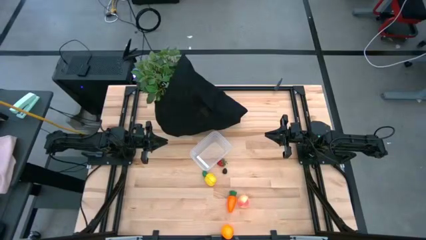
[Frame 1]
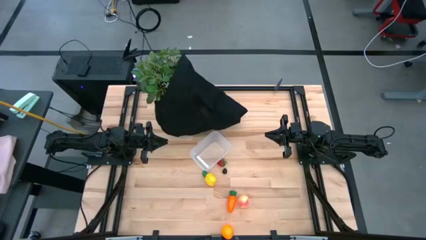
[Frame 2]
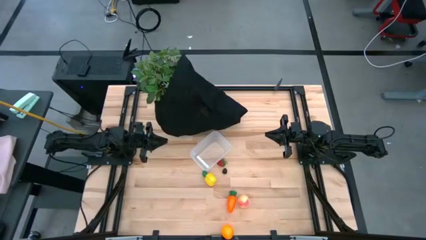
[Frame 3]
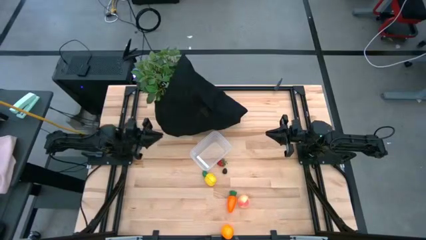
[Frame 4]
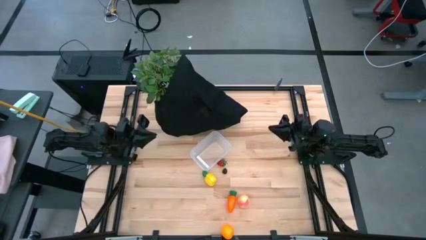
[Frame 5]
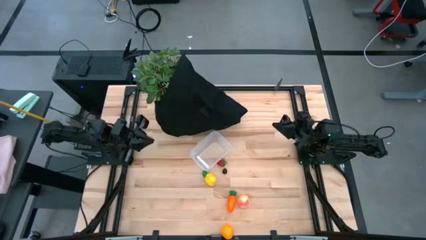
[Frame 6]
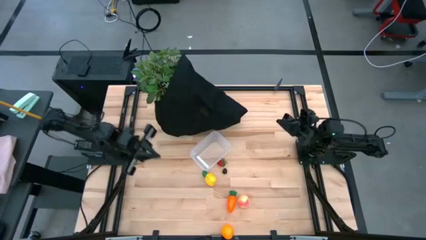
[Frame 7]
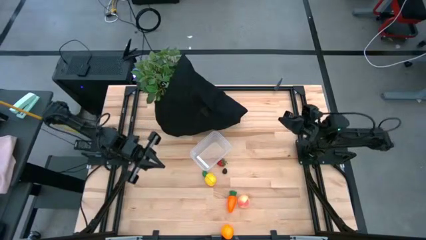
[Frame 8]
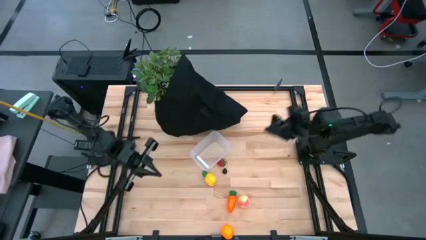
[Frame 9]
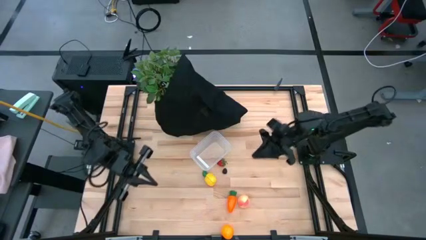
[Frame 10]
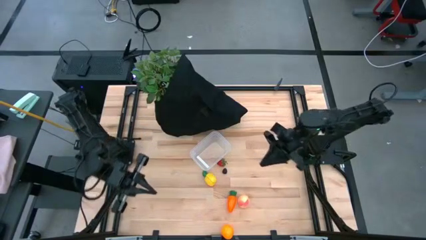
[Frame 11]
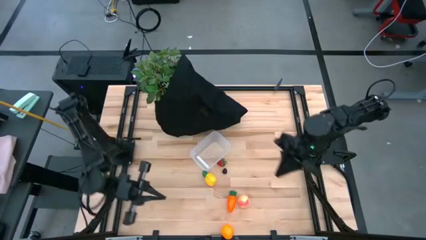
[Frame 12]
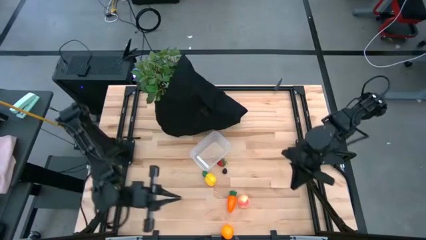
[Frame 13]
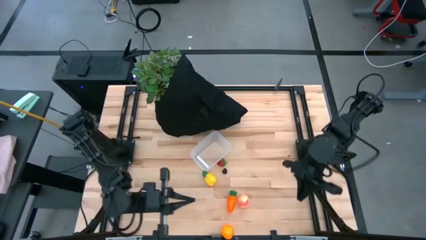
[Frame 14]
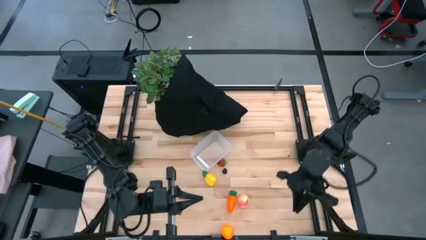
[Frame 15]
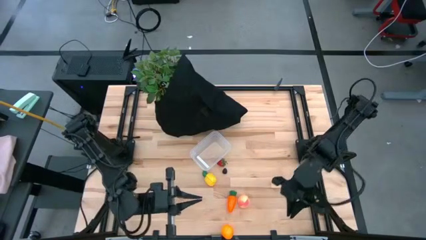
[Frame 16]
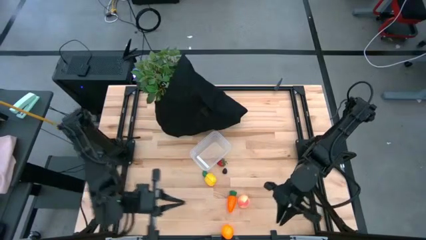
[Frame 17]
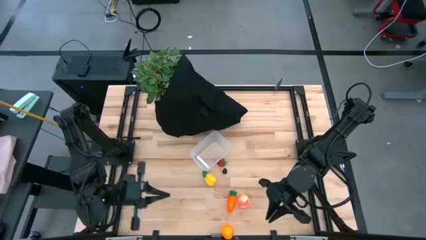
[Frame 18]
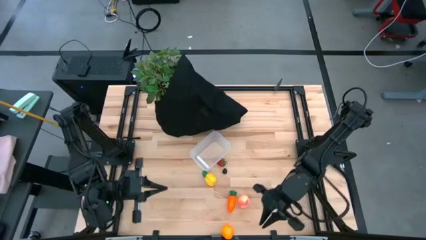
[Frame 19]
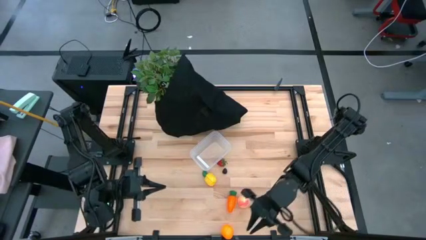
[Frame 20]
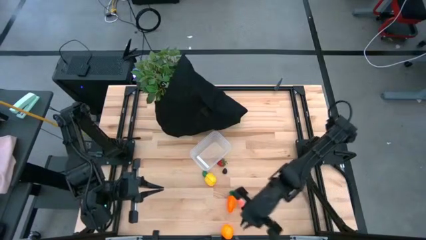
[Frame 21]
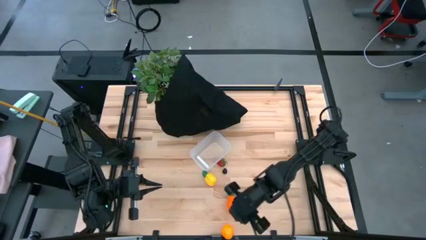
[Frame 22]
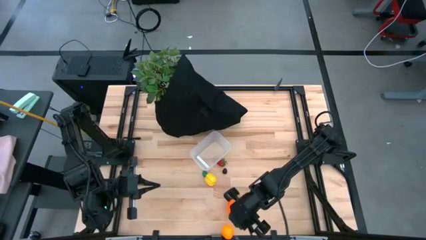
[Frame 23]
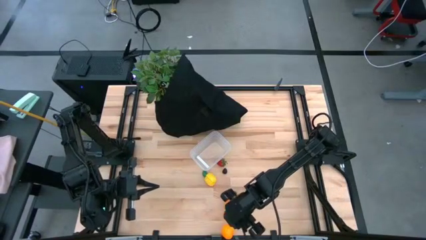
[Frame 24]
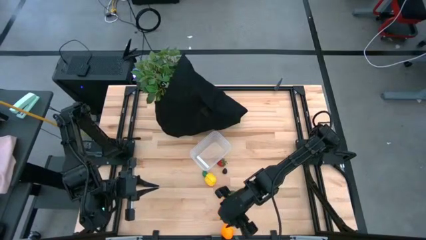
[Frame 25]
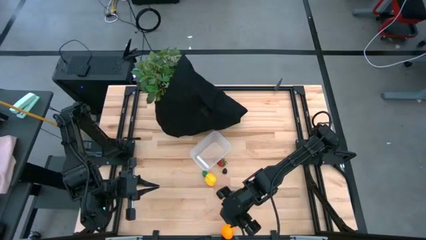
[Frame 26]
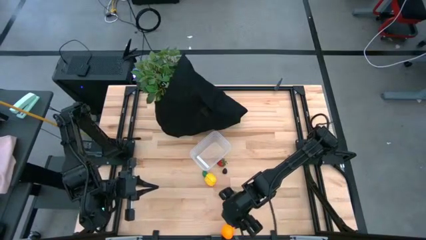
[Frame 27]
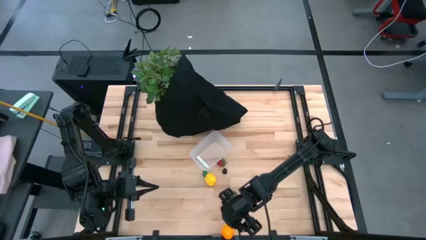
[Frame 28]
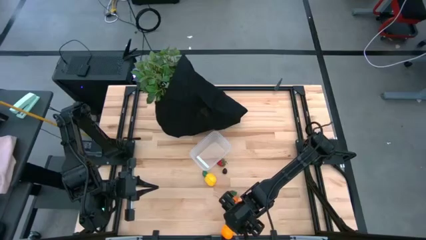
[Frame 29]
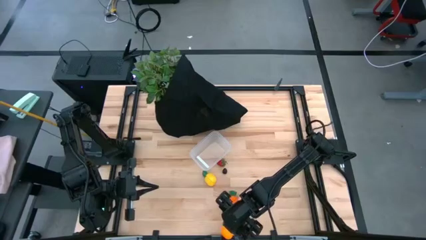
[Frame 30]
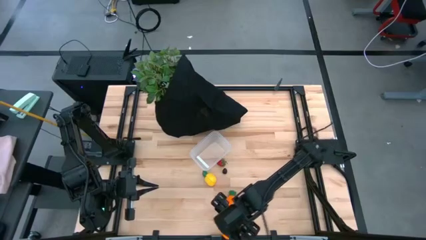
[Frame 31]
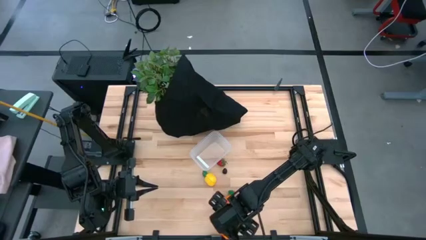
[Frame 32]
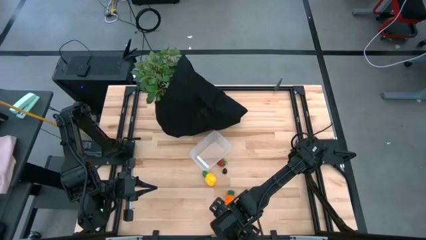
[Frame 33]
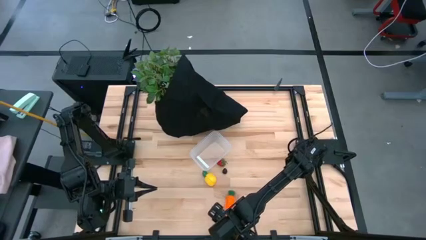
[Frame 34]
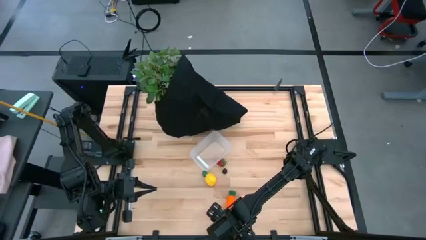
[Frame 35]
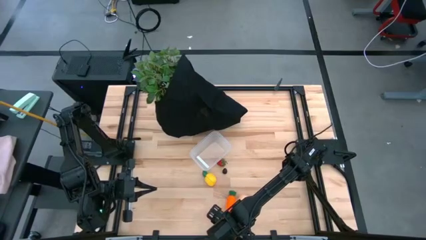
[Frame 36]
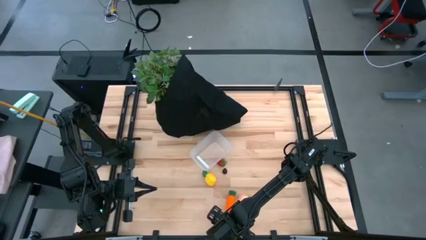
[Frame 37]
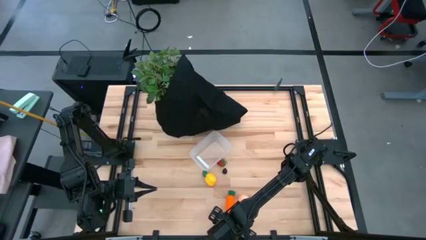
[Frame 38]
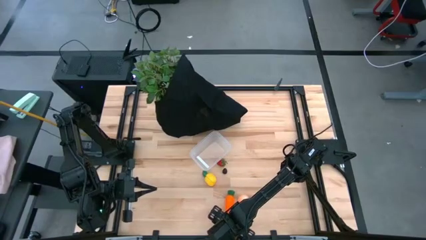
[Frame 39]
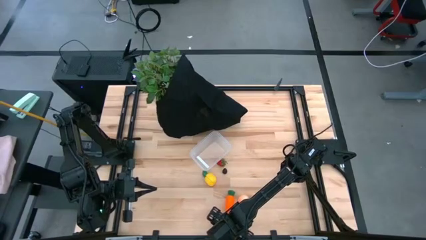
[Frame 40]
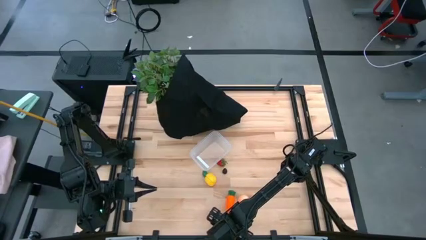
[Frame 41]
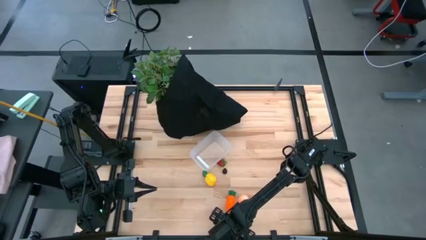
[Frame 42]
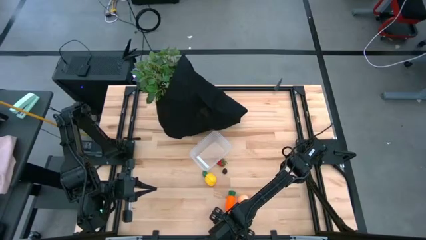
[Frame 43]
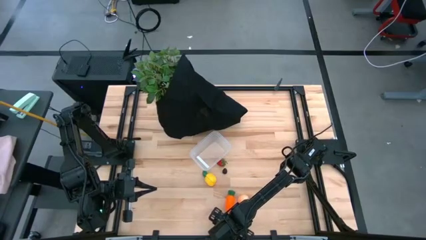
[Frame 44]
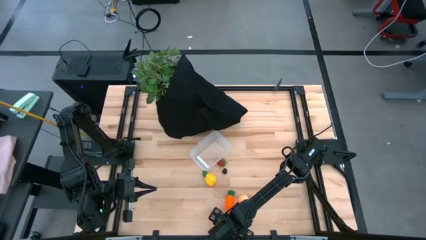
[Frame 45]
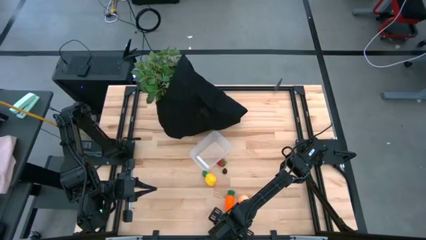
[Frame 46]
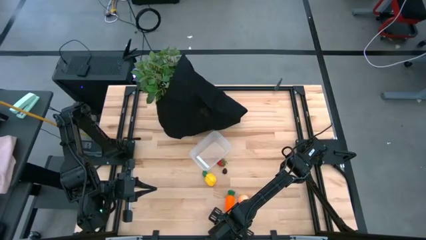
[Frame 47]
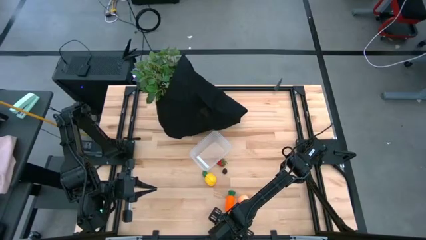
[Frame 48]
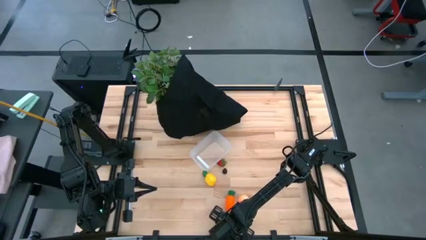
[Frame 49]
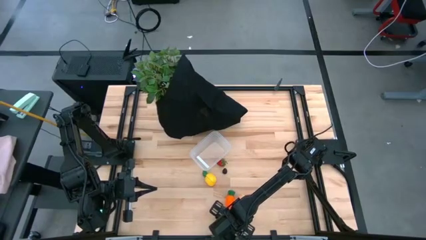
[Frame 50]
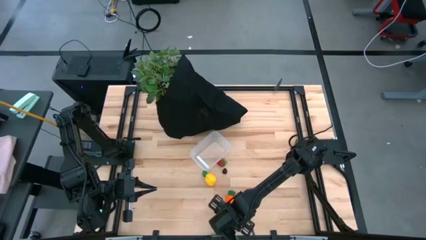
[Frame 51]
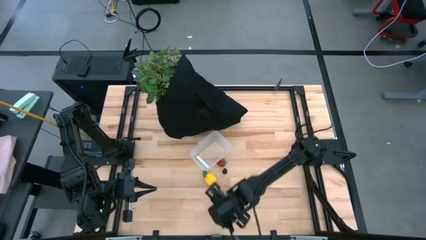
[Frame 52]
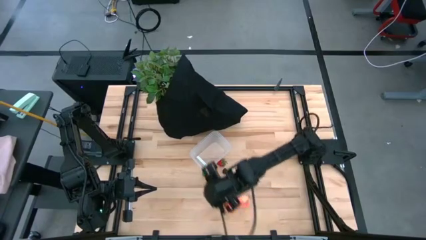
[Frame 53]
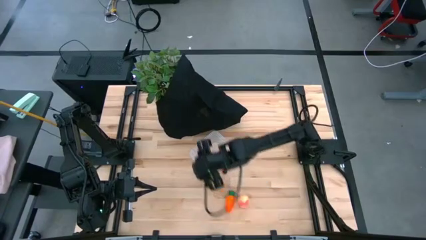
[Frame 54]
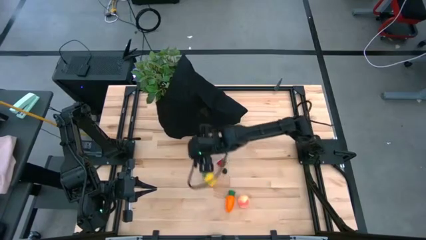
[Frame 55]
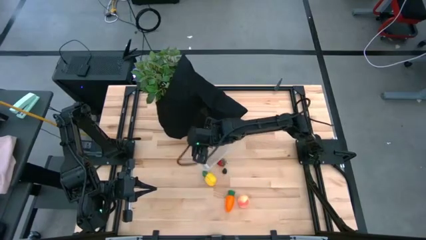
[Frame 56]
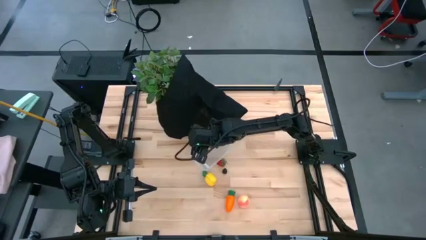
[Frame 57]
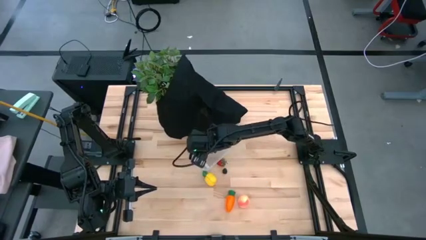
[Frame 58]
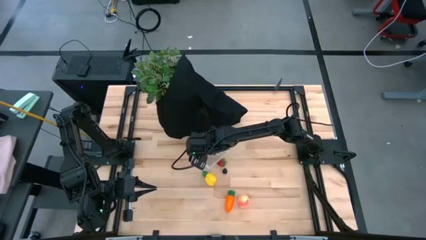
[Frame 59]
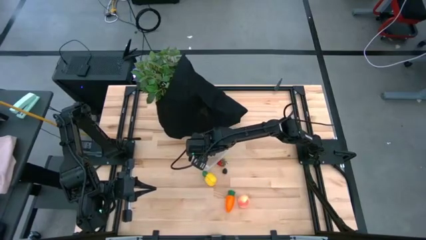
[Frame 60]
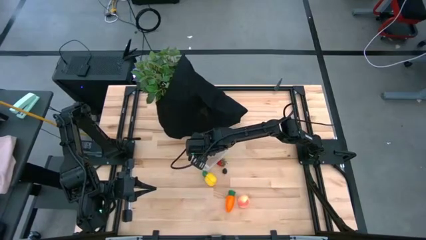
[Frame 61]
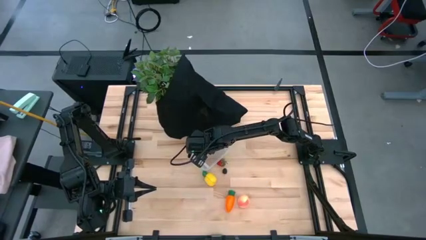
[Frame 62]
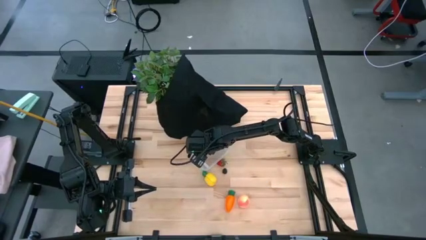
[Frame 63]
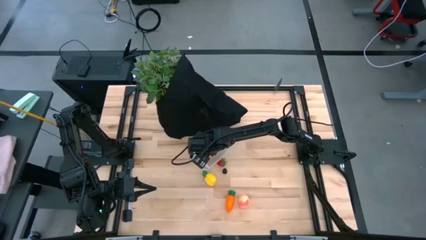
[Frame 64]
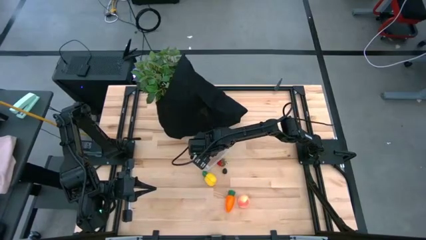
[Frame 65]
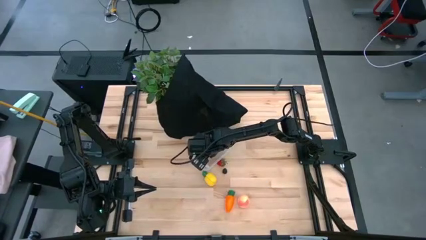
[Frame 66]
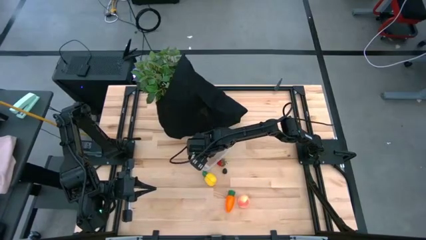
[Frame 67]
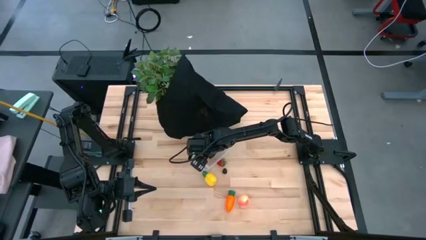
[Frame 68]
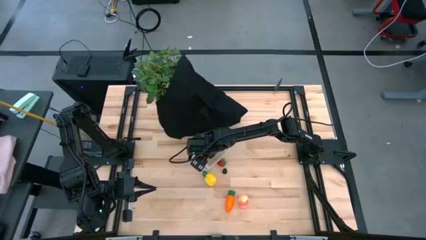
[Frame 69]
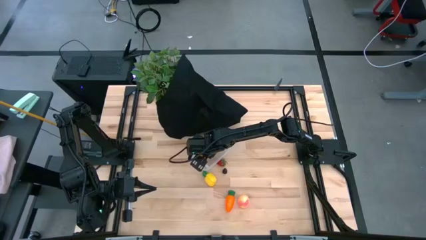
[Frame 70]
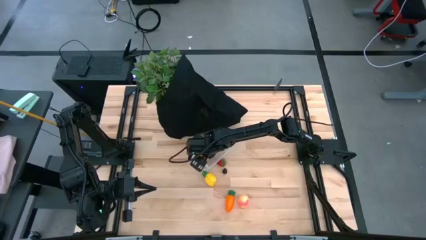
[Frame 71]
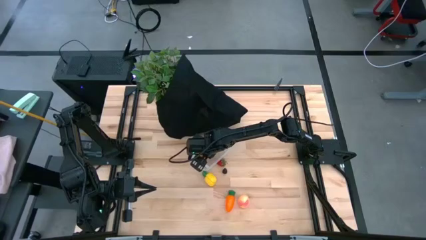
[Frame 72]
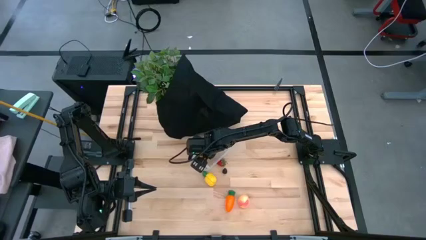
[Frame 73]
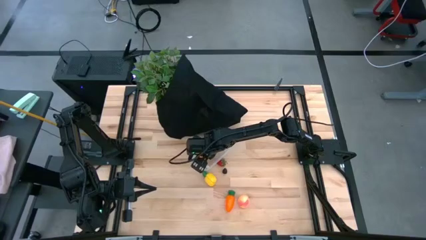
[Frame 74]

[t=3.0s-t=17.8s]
Task: Pick and placing Produce into tupperware
Put the orange into the transparent bin
